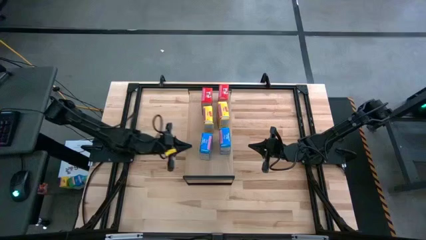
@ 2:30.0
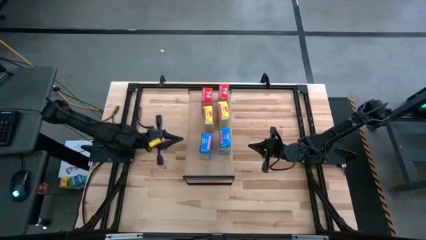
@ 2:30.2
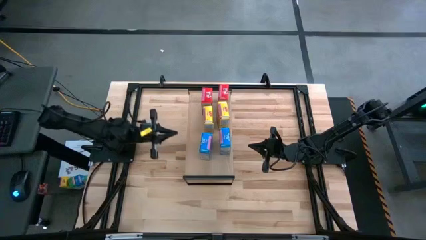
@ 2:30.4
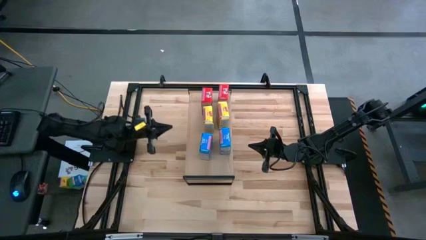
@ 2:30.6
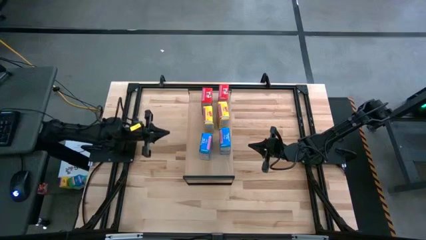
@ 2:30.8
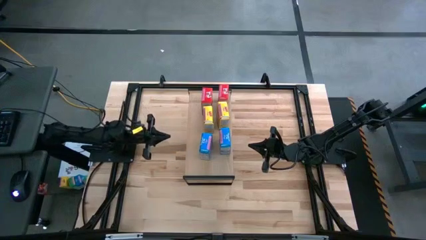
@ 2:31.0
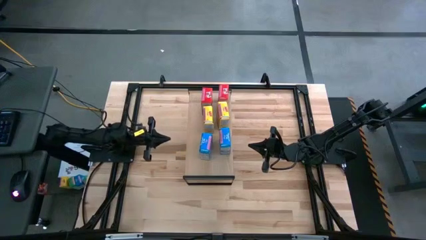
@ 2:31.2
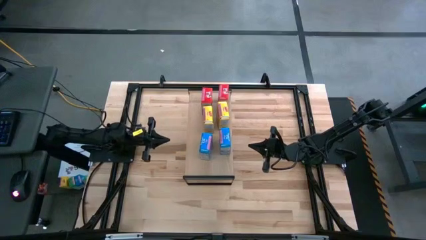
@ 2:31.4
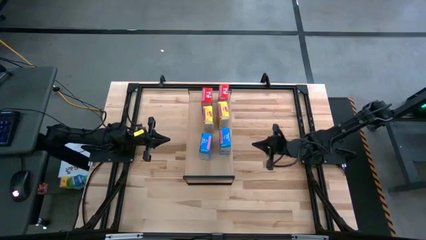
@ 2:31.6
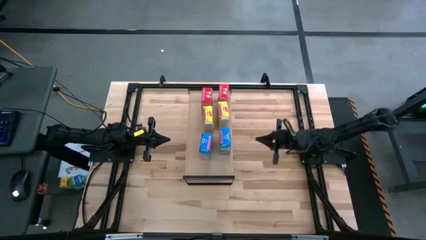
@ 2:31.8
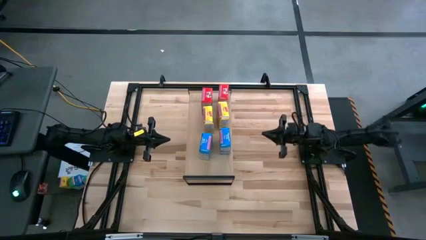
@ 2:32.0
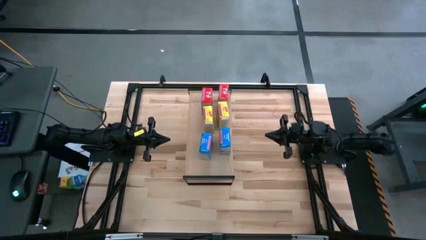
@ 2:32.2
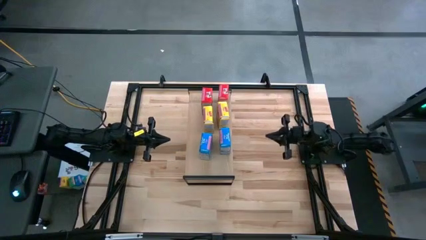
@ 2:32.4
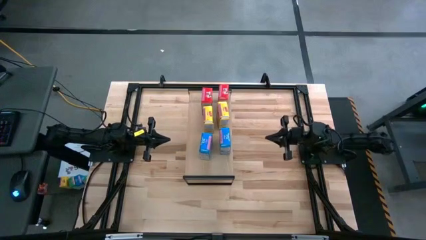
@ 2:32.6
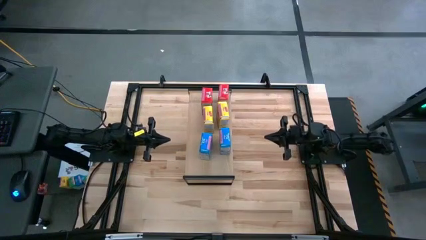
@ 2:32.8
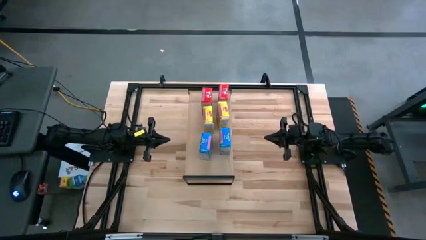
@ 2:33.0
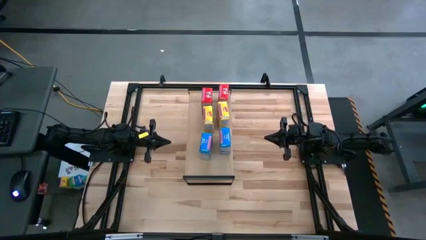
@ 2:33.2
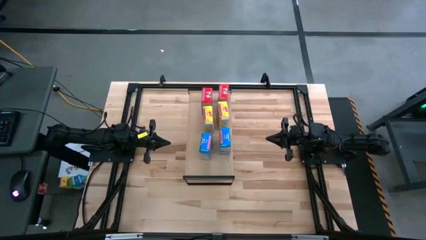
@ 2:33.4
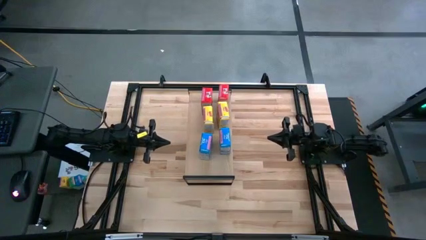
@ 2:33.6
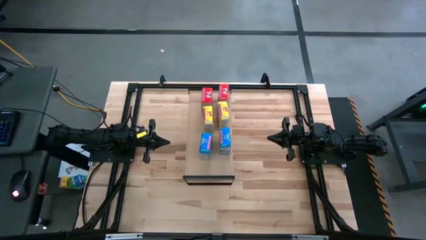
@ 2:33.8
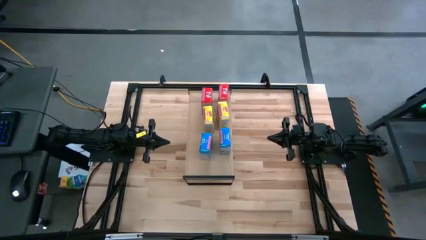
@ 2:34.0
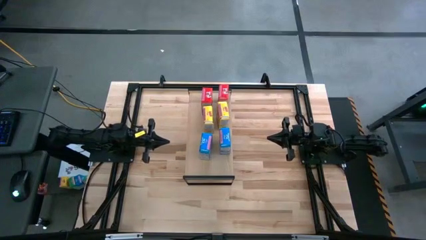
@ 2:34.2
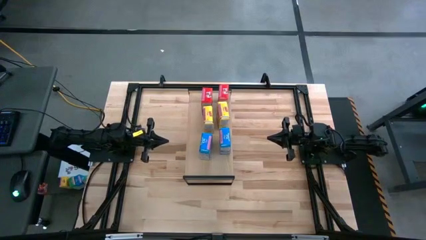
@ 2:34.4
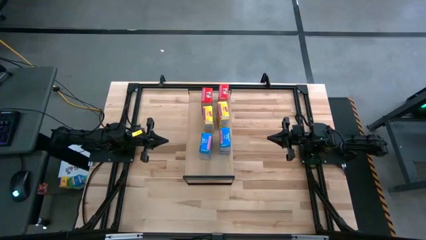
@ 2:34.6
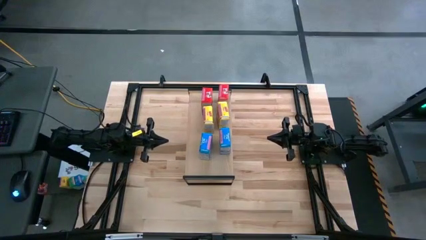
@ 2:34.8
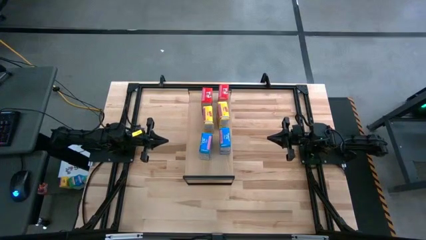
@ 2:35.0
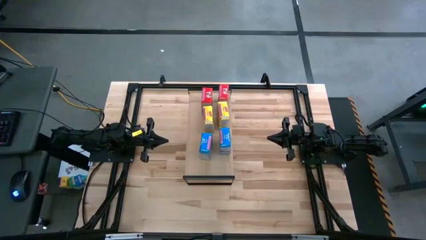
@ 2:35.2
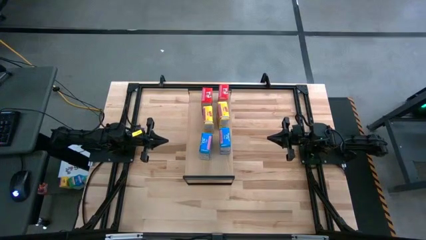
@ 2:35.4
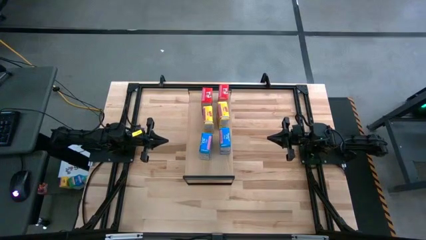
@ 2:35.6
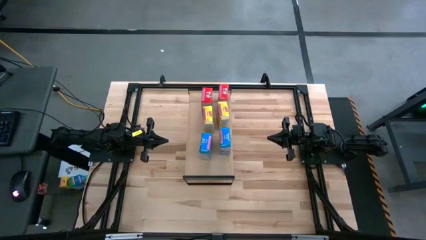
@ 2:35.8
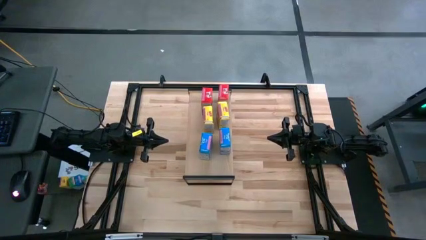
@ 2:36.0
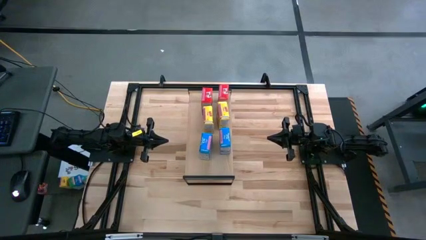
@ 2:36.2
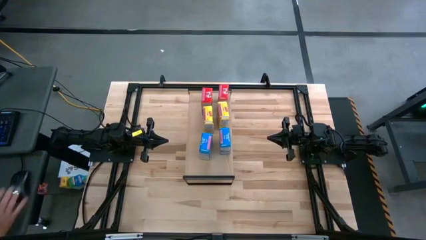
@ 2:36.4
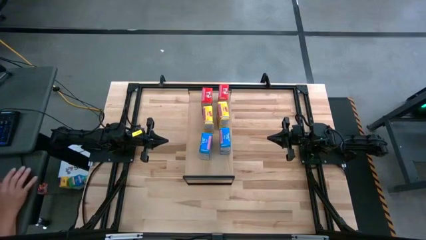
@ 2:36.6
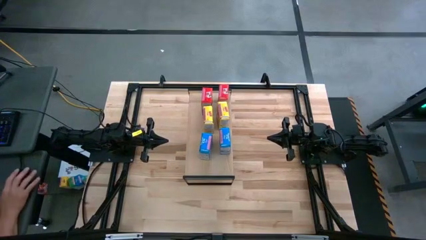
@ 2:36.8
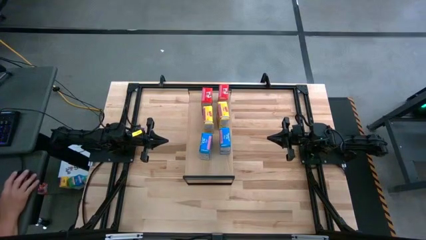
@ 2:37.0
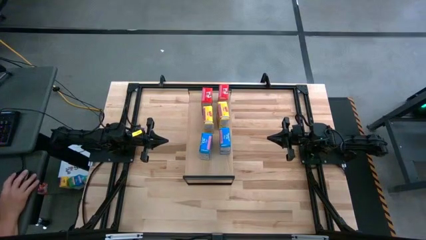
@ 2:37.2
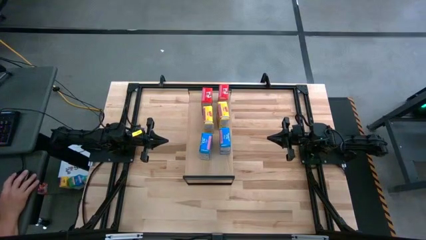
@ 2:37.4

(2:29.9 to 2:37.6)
Task: Stack cereal on shelf
Return to Home Position

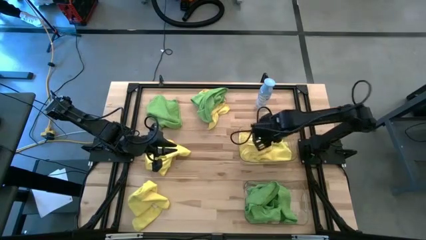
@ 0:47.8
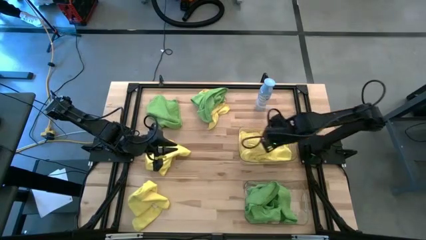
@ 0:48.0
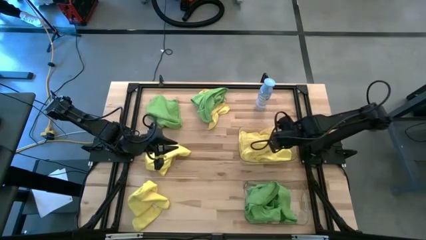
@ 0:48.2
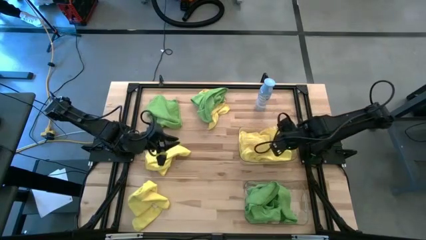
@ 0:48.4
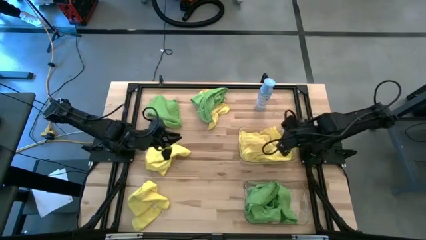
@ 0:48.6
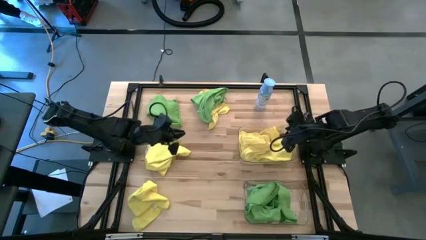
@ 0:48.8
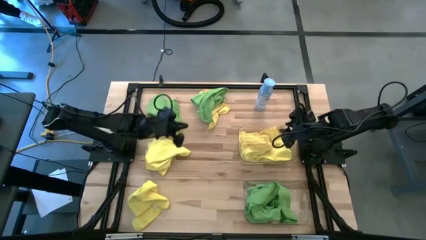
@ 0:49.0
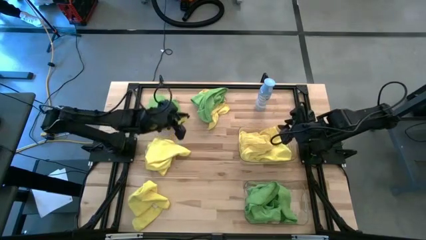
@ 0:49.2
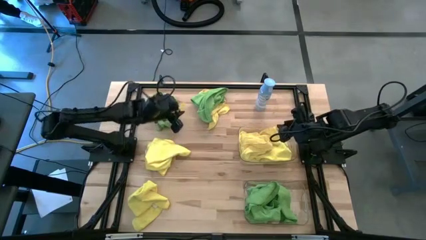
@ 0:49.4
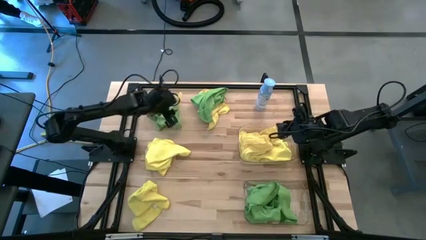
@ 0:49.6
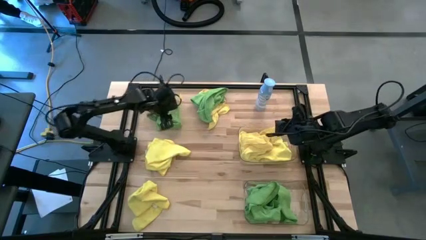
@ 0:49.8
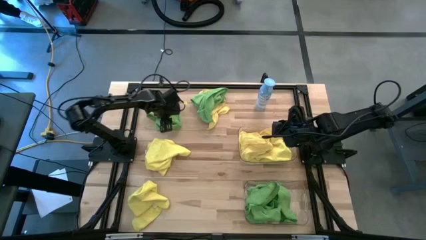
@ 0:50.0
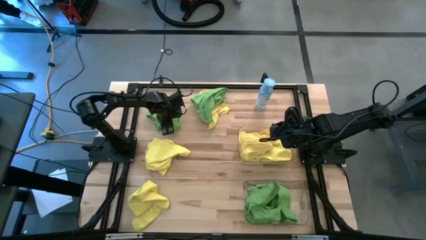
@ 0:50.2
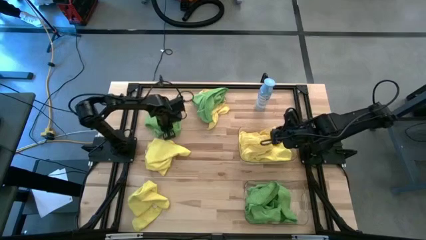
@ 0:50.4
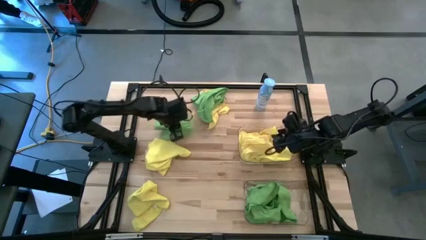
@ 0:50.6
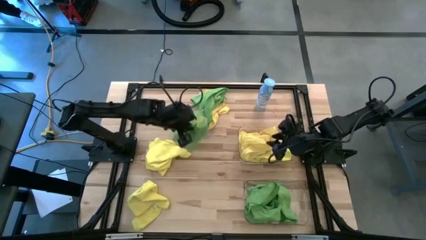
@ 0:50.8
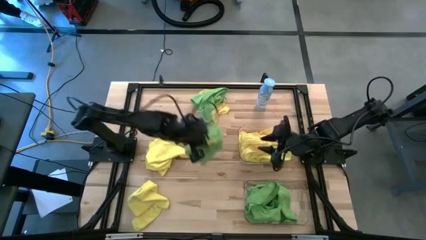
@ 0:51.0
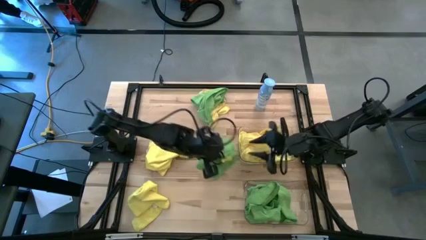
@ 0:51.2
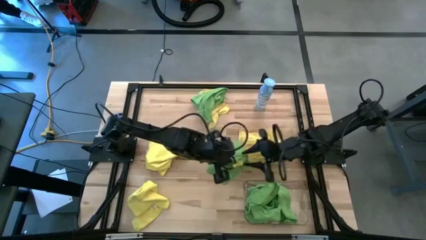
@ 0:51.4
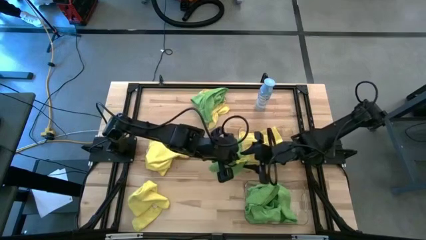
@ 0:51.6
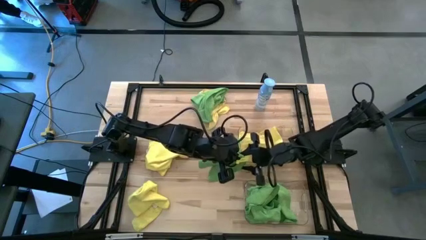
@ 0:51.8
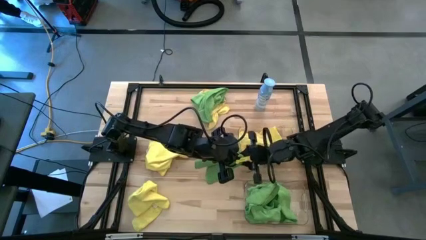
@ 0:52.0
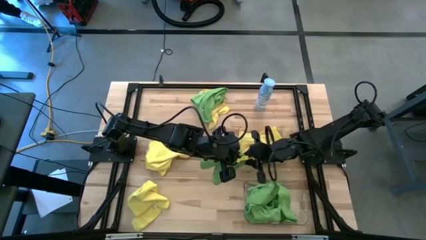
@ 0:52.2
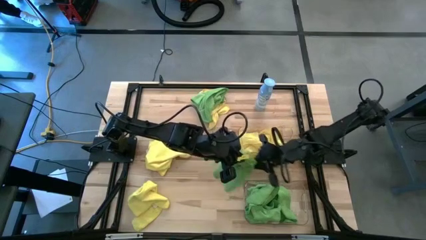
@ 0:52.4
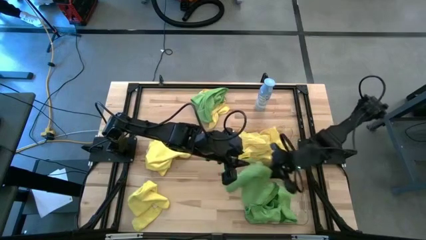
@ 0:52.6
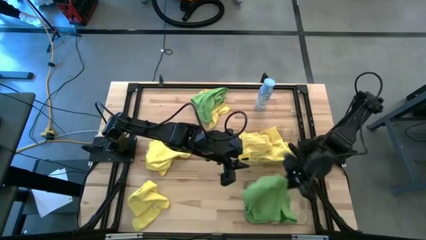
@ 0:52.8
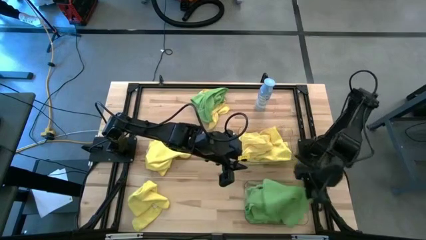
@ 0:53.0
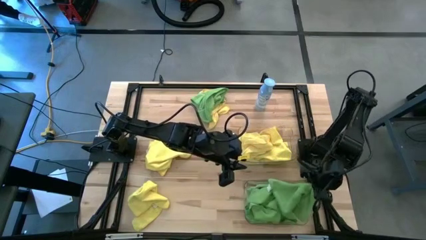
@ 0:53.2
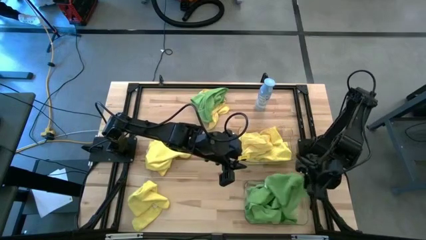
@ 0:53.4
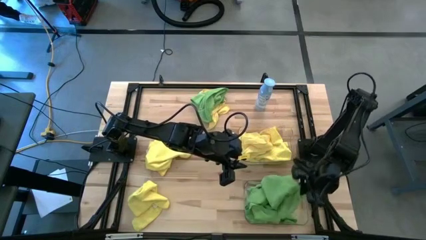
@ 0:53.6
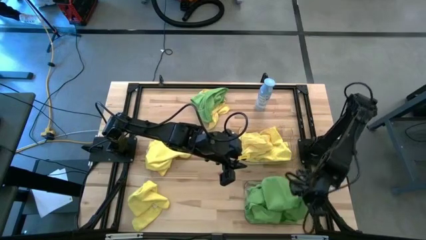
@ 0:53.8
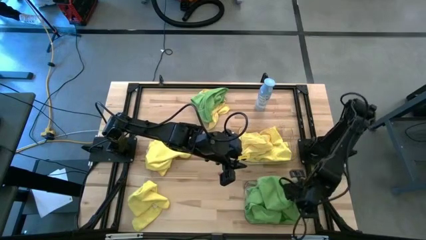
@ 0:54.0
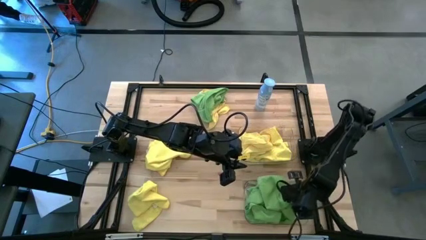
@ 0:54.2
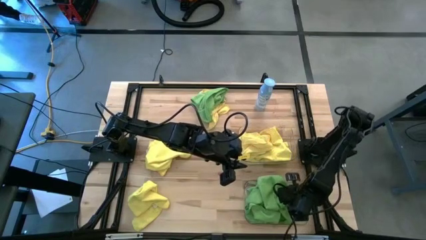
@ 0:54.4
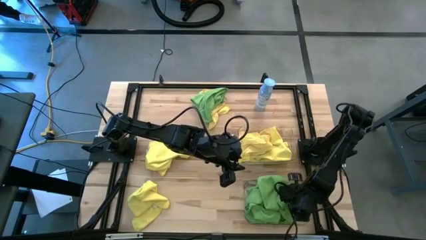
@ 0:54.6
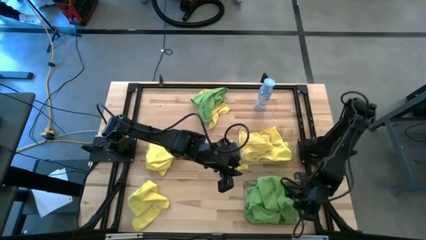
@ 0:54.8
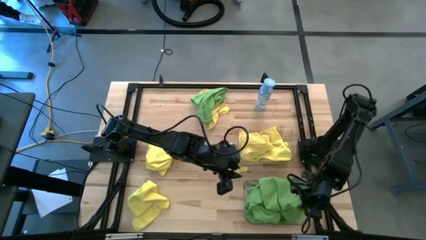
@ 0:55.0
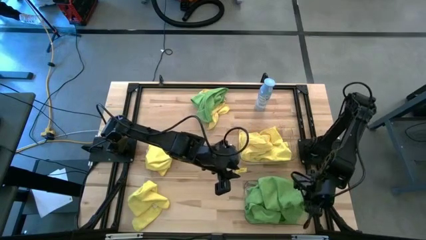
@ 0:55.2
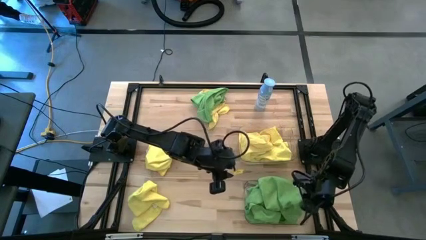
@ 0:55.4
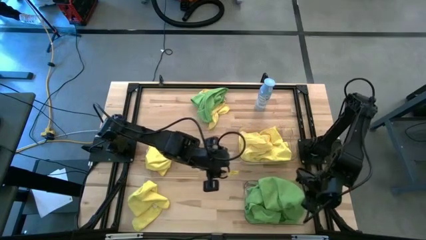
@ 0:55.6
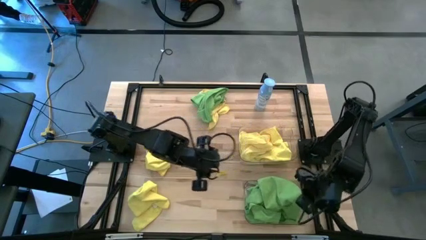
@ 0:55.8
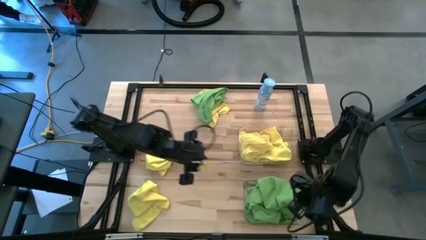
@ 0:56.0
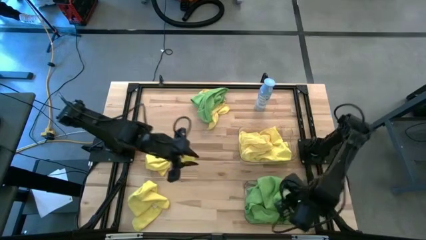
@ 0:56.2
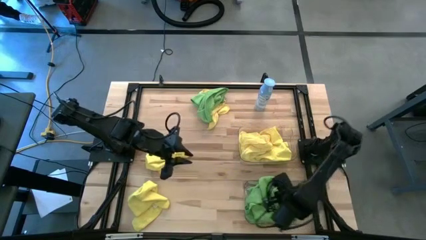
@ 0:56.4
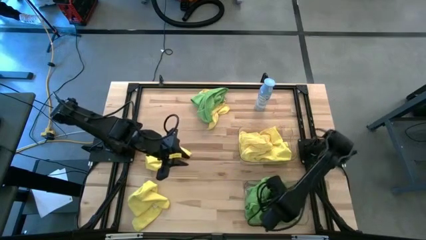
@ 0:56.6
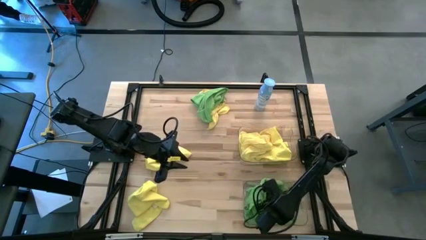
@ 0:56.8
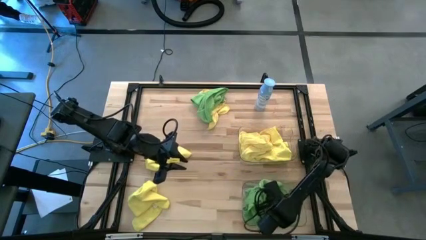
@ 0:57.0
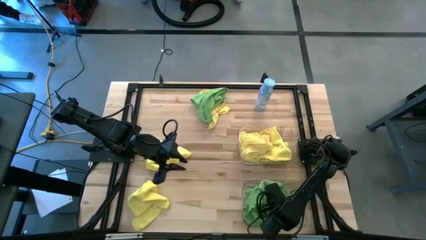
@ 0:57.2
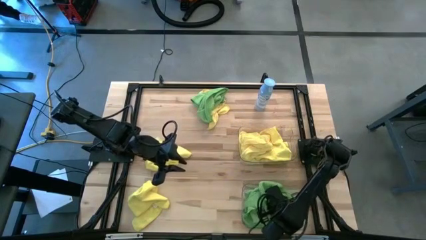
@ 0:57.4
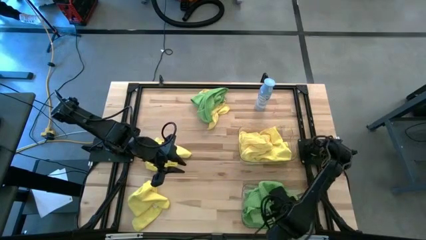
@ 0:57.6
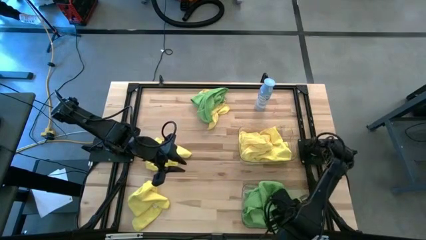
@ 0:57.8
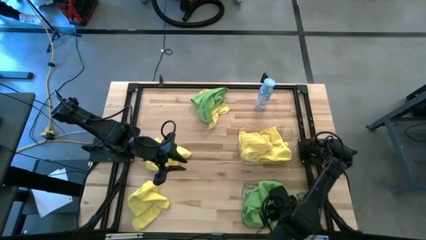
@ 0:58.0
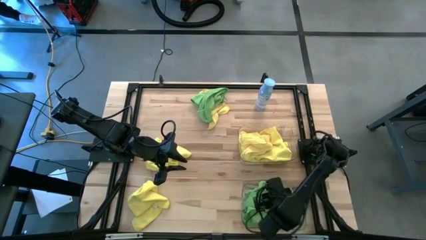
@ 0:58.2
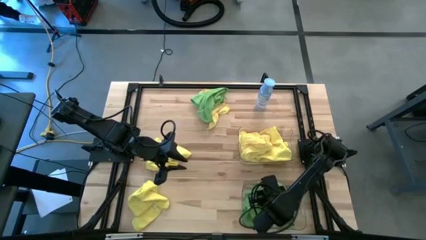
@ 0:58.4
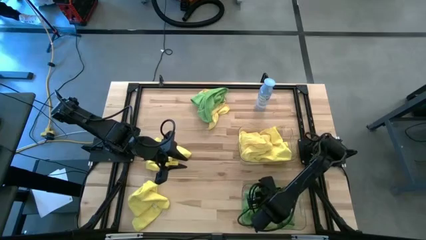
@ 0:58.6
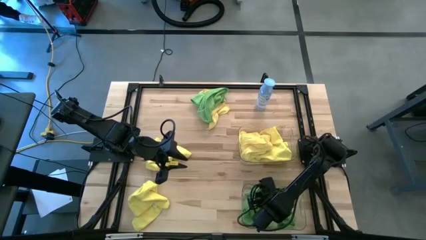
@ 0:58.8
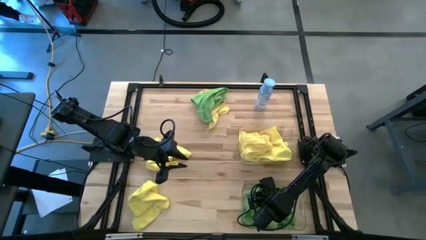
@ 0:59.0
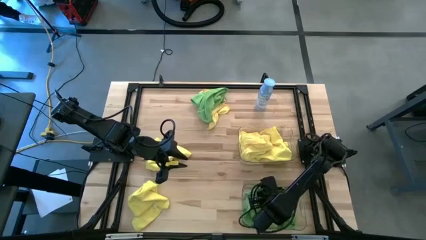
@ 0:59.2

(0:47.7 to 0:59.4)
Task: Sort microfiber towel by color & place in baskets
Put the green microfiber towel into the bottom transparent bin
